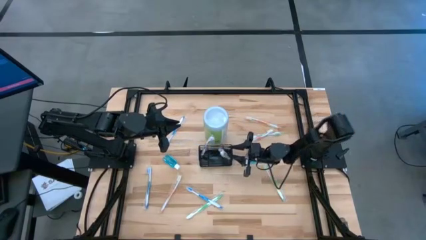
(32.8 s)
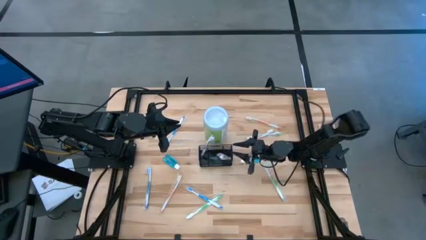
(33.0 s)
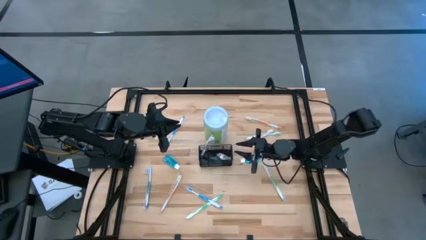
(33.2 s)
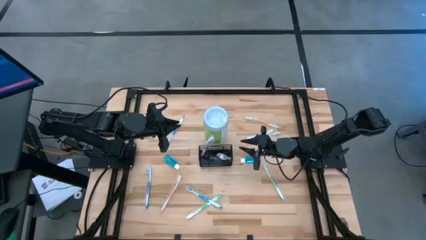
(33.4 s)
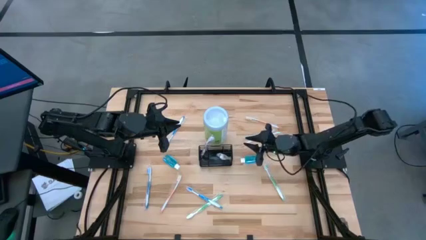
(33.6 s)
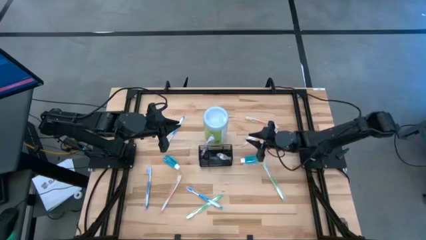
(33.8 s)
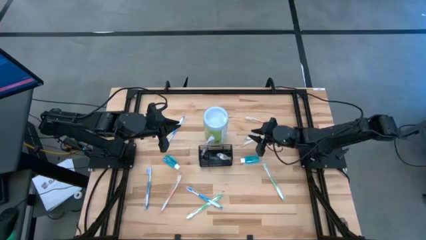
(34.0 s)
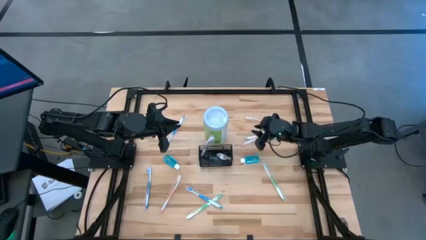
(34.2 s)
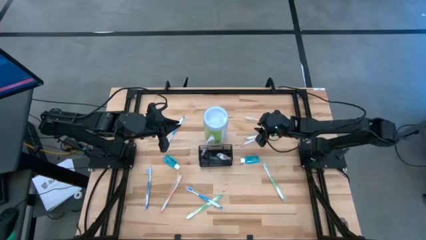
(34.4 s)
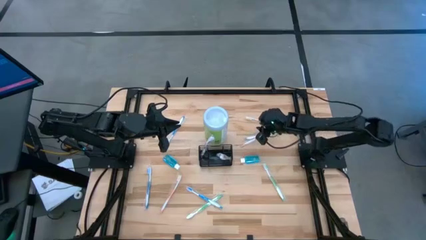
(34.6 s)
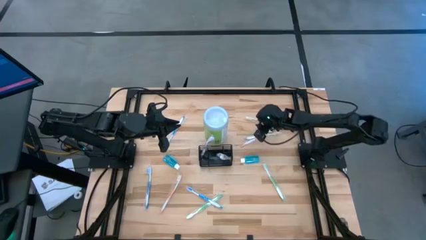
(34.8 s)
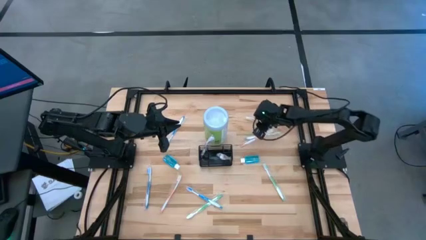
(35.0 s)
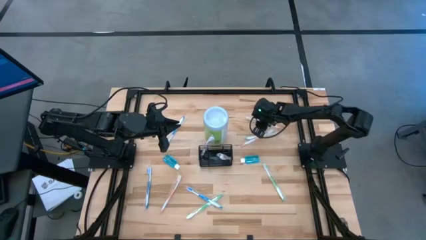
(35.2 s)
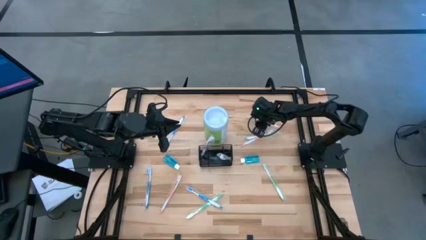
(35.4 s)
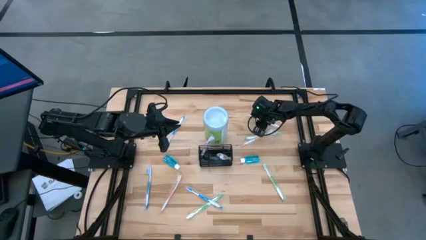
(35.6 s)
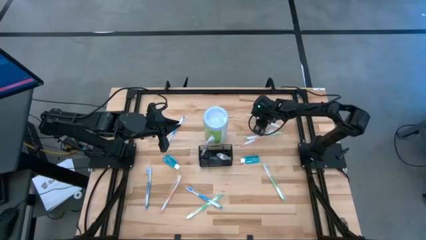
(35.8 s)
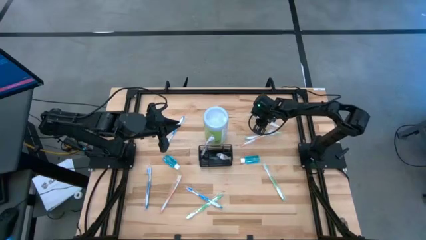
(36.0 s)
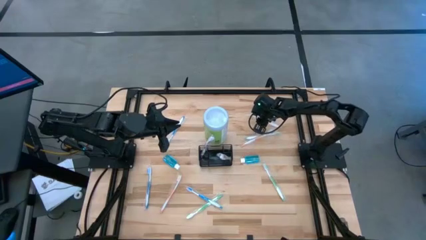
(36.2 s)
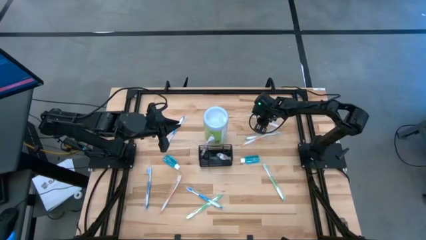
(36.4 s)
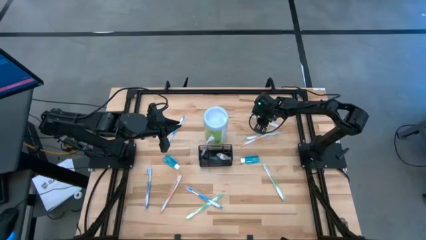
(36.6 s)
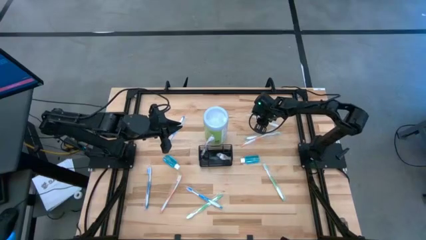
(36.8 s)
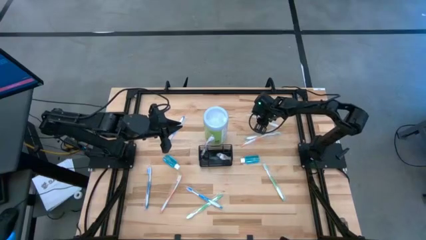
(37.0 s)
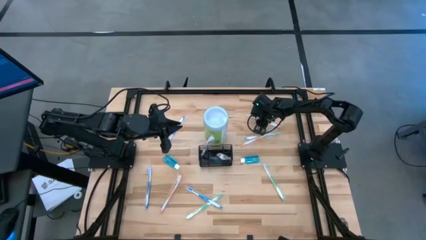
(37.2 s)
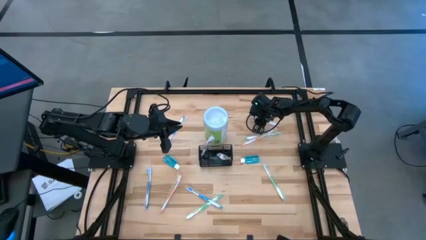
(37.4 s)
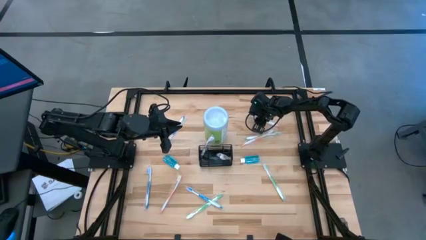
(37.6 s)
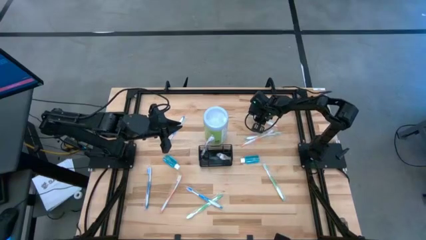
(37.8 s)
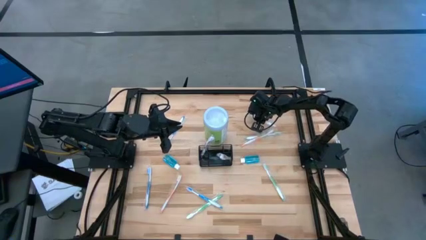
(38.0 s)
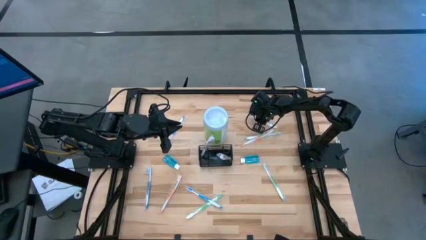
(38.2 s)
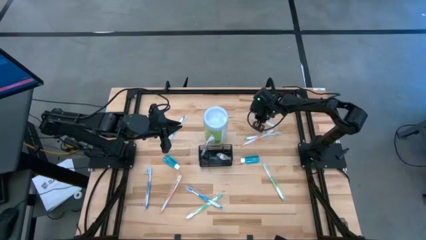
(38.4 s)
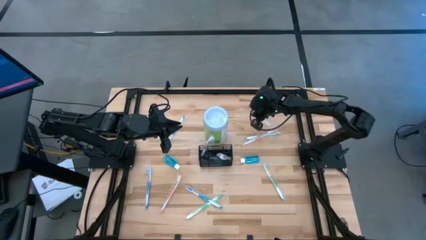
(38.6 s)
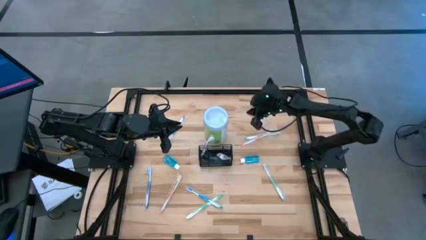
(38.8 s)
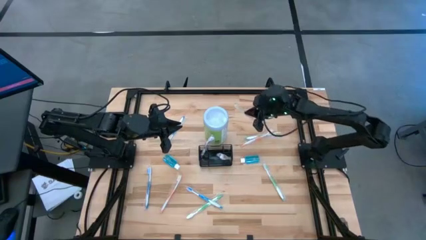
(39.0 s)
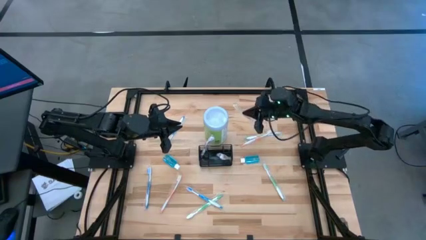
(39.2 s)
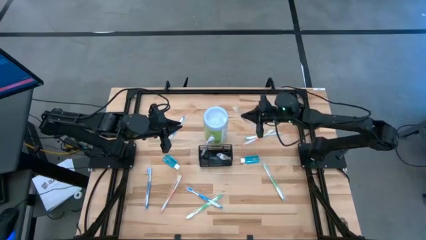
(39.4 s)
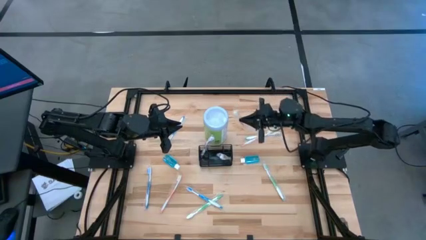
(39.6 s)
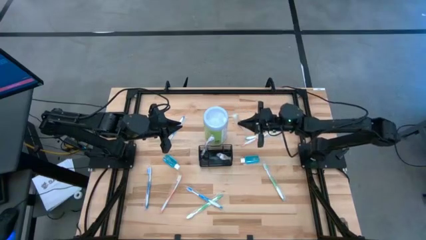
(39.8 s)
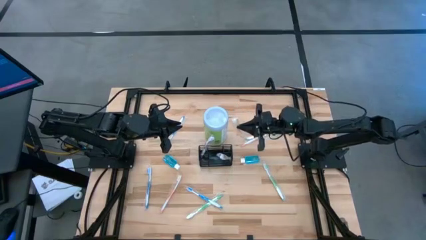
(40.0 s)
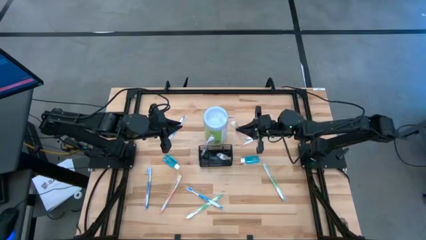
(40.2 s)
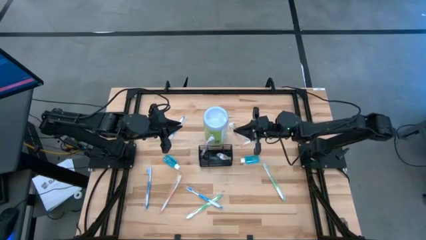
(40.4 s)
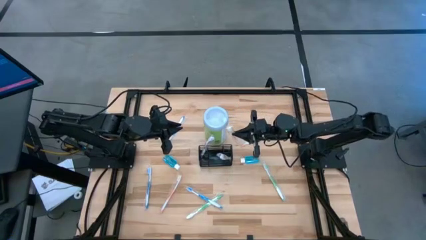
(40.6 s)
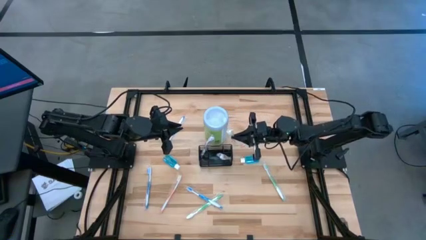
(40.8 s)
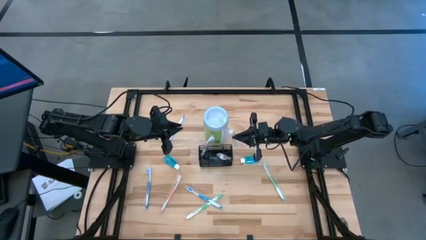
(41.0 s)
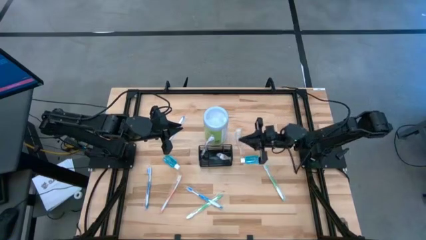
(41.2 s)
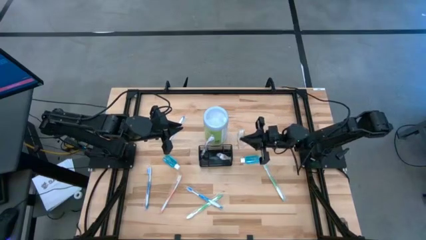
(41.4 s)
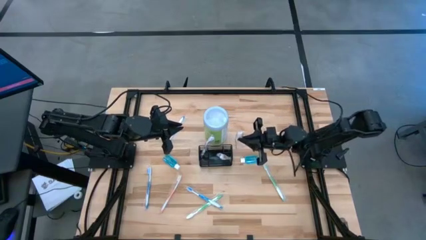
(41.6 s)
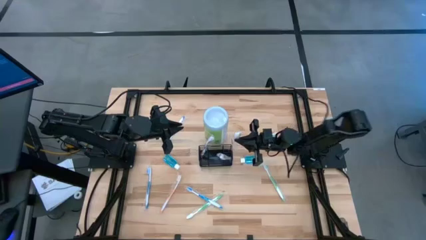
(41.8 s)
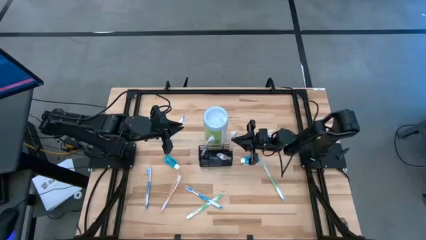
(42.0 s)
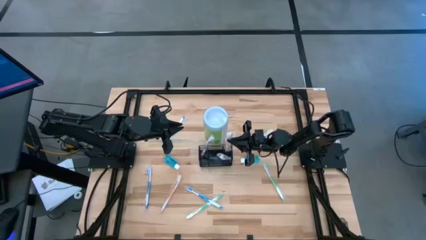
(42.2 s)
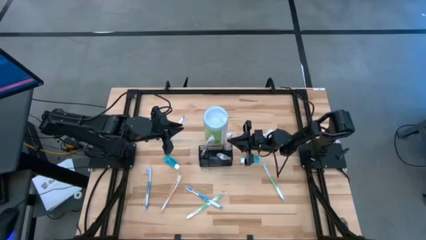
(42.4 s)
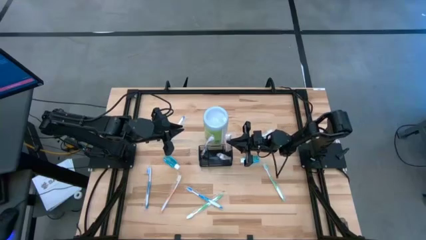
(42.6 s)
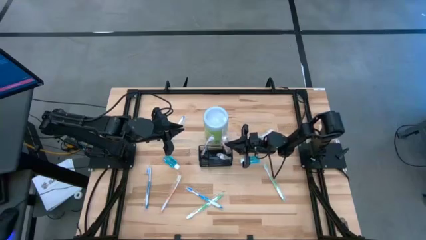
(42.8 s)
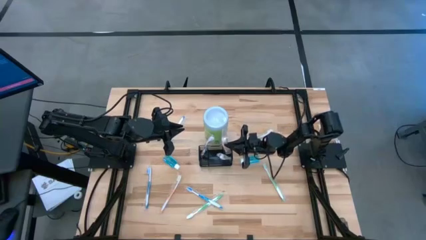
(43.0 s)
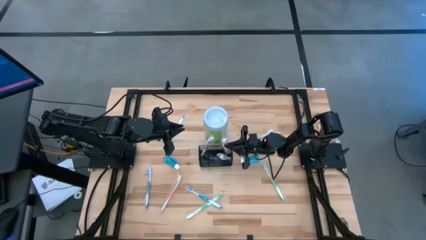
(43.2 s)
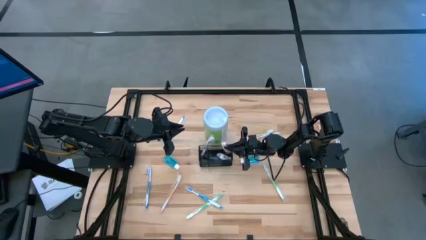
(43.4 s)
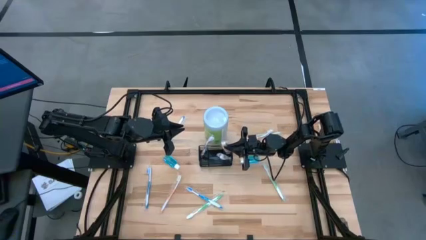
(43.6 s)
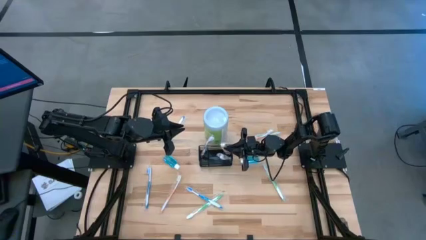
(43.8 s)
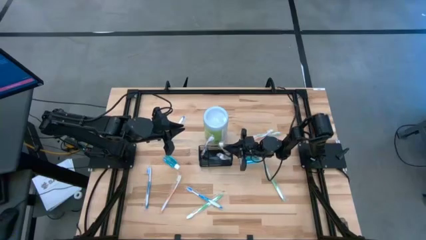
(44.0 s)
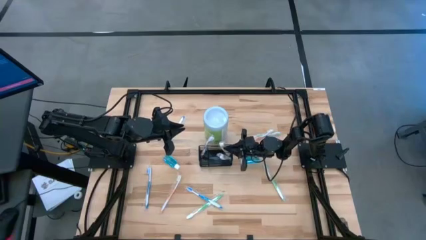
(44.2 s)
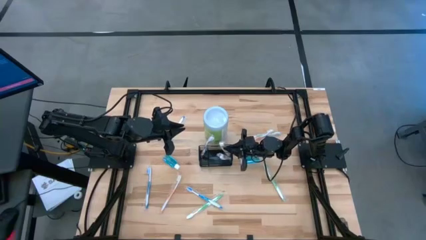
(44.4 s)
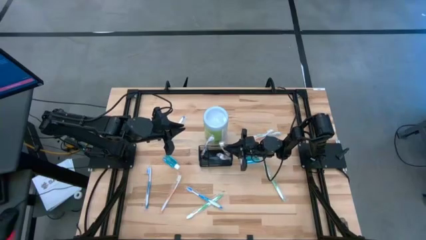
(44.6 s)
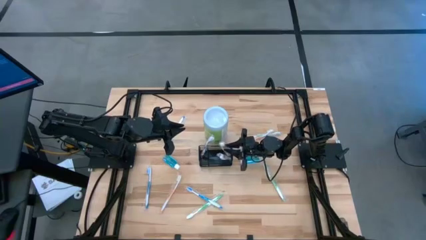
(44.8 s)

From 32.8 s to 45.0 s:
Task: Pick & Place toothbrushing station
Put the top right orange toothbrush into the wire organizer

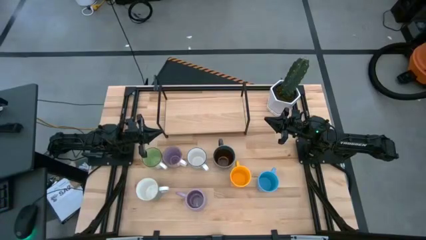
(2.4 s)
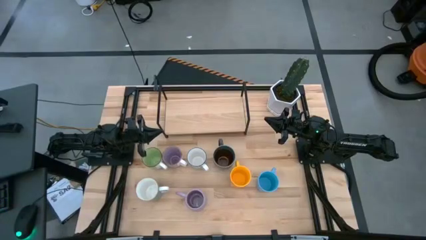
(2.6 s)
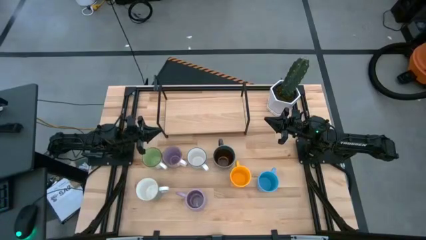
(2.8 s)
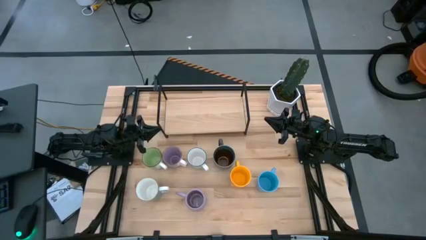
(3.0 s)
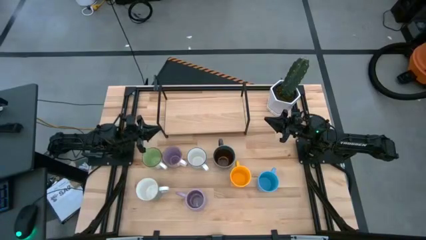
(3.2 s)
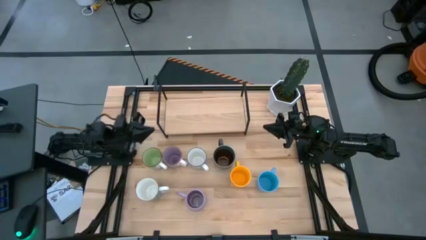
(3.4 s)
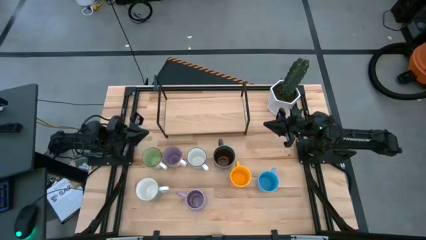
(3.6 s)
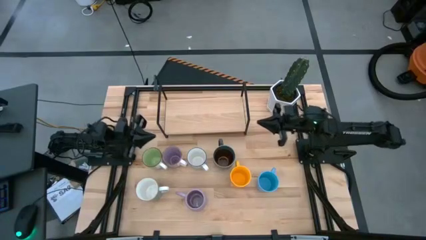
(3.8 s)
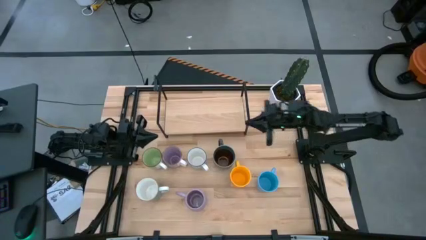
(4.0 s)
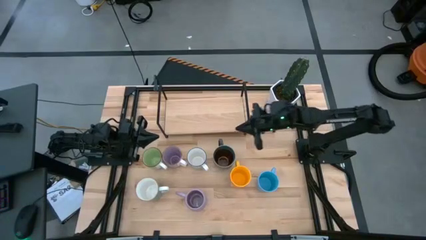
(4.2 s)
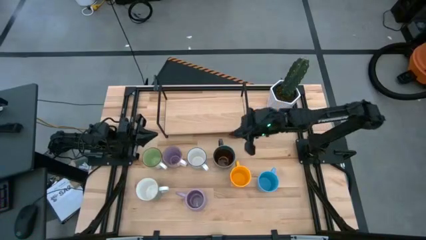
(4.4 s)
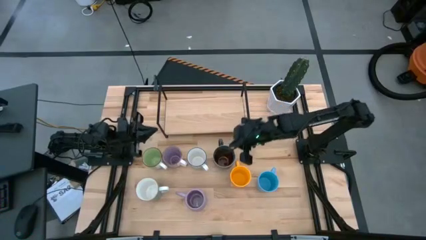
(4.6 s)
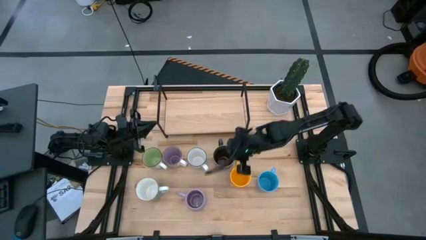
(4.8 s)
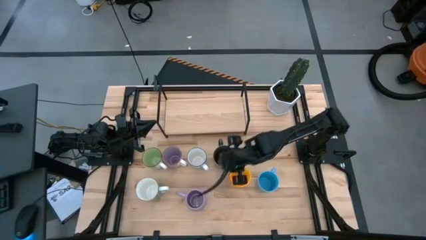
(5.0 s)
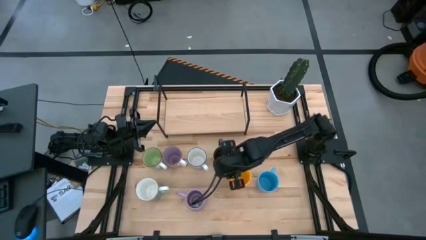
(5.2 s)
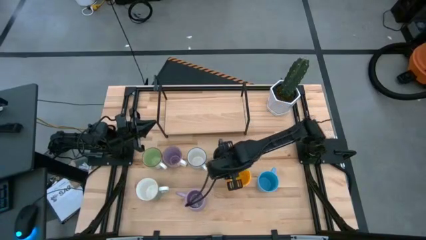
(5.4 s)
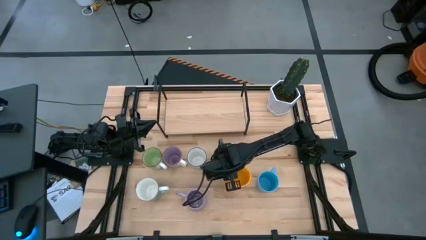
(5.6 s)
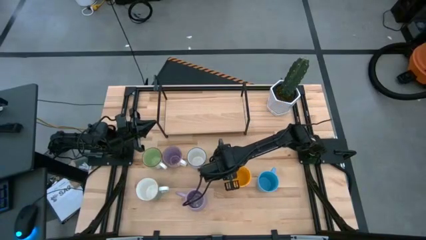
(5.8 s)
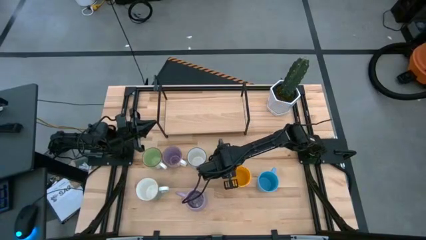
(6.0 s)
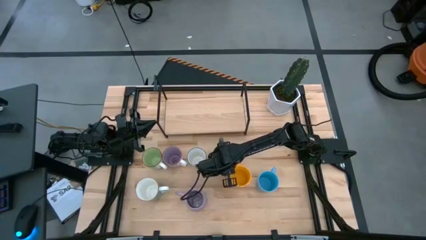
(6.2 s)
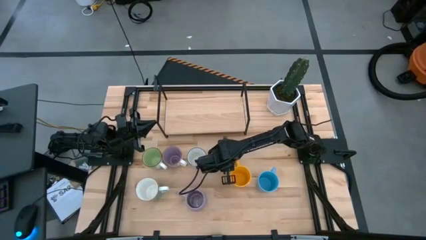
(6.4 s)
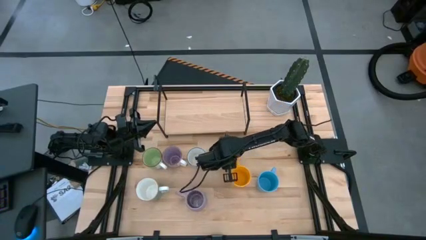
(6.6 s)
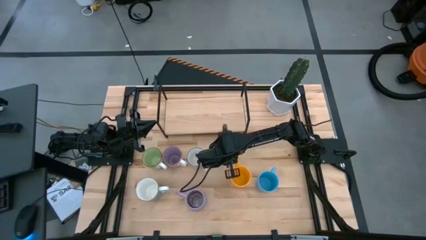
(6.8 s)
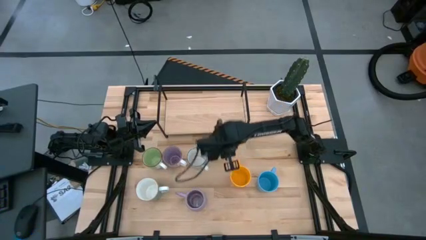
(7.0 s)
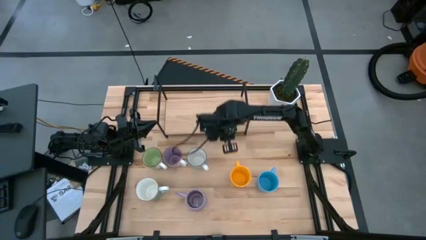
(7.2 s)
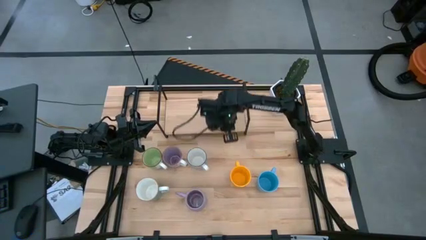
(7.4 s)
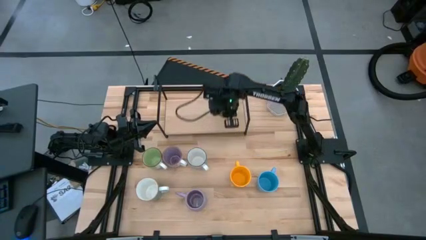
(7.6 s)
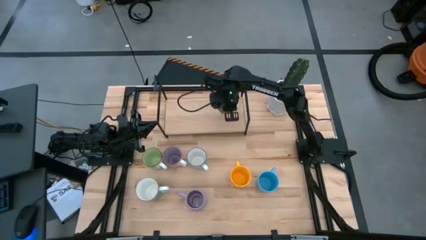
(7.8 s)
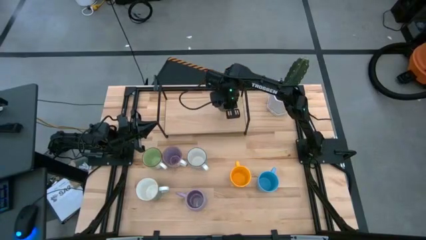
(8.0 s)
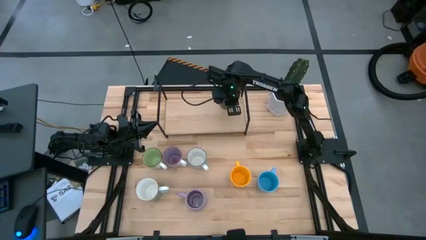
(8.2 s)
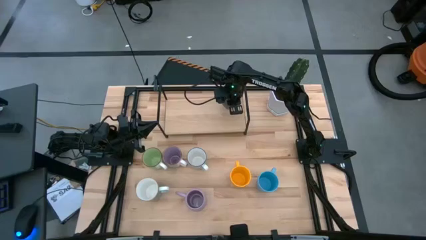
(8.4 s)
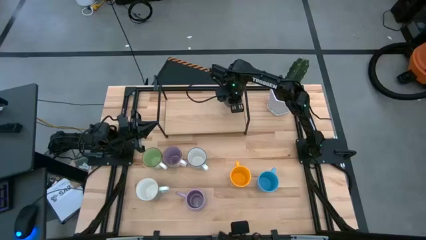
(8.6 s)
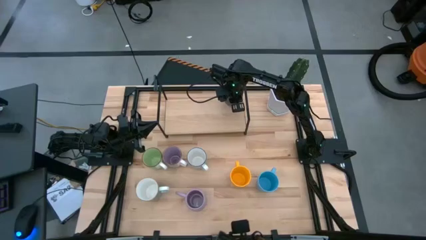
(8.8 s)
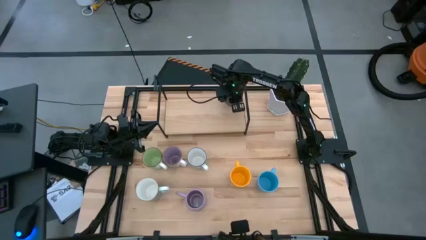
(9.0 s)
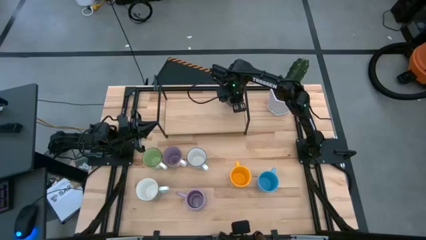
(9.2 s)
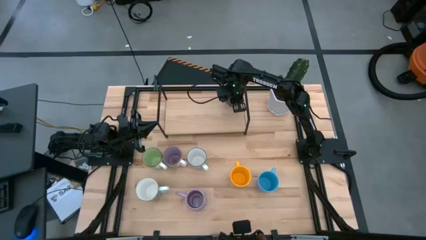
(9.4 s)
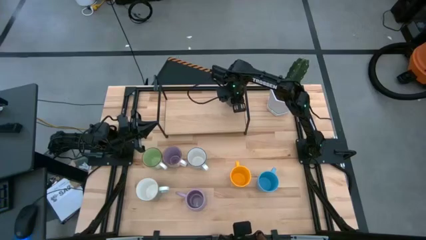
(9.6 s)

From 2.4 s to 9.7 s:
Task: Place coffee mugs
Put the blue and brown mug on the shelf
